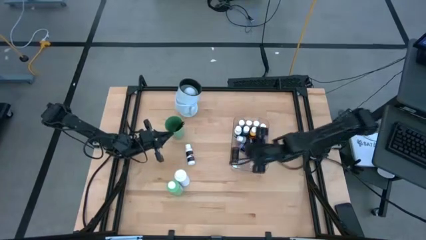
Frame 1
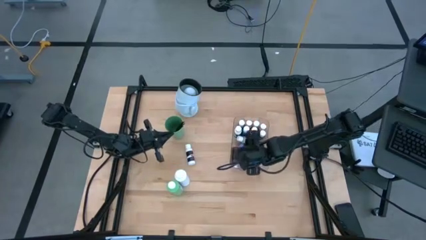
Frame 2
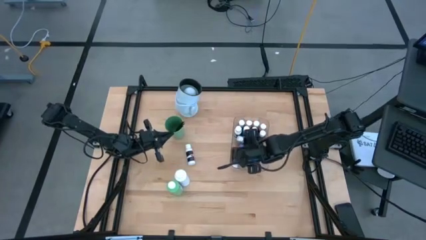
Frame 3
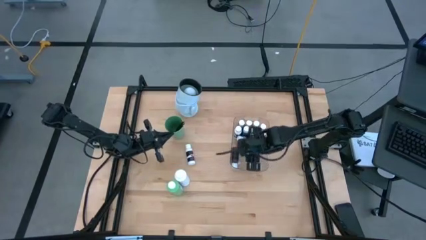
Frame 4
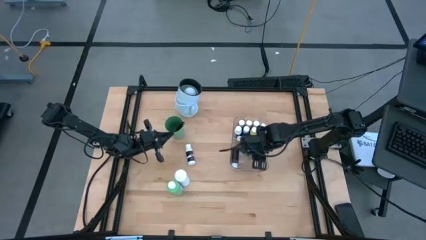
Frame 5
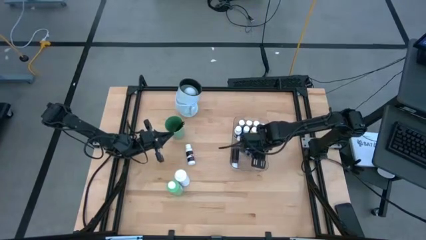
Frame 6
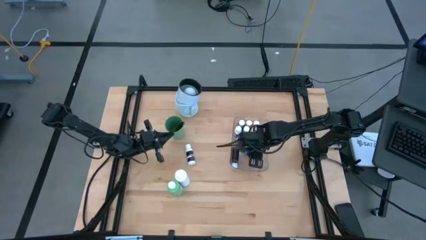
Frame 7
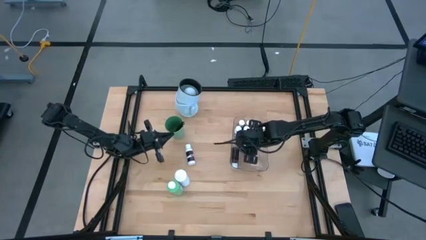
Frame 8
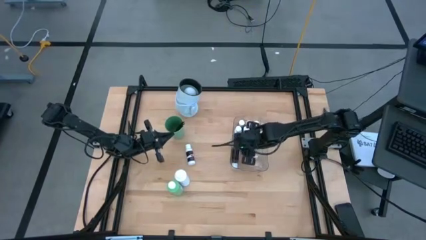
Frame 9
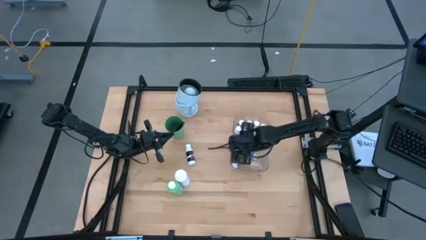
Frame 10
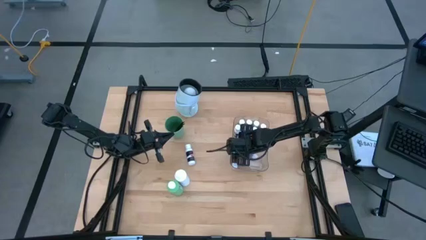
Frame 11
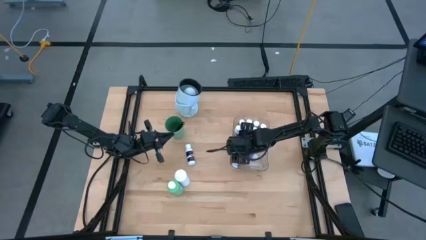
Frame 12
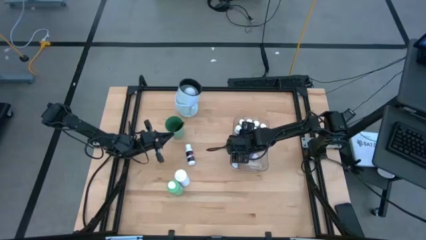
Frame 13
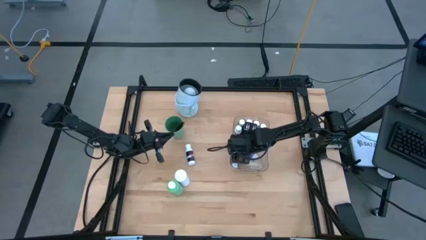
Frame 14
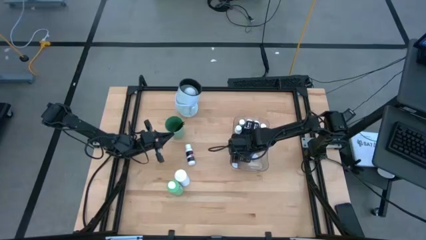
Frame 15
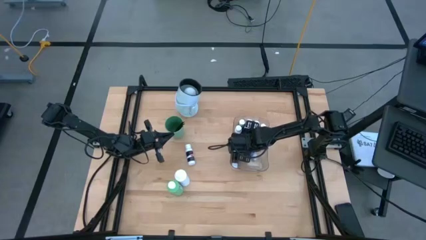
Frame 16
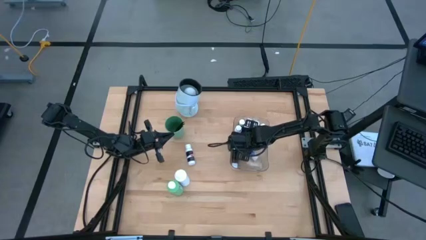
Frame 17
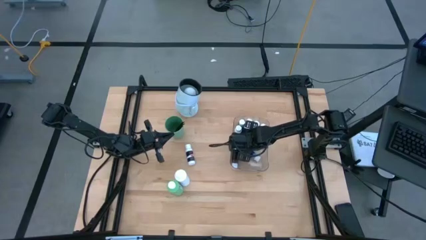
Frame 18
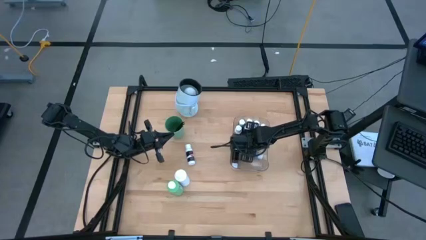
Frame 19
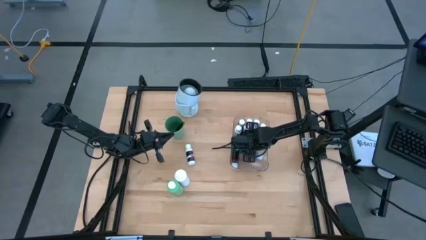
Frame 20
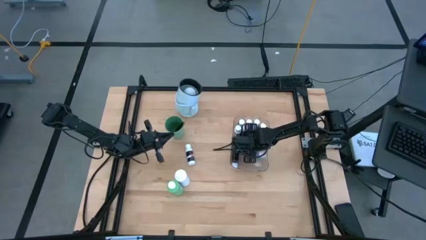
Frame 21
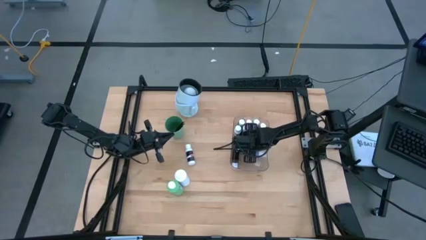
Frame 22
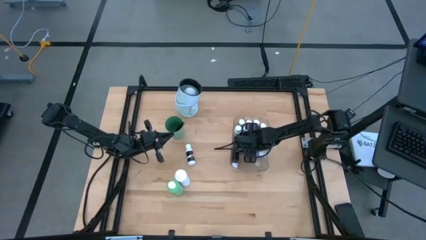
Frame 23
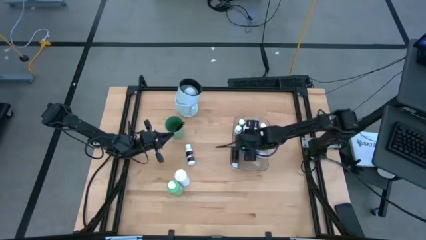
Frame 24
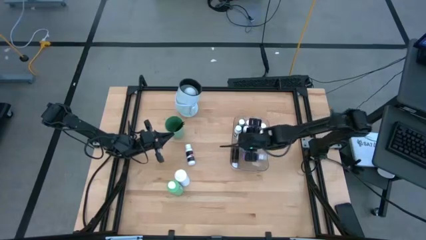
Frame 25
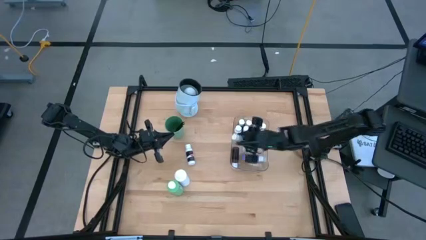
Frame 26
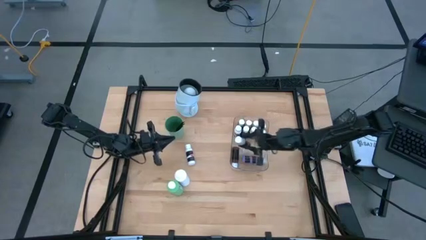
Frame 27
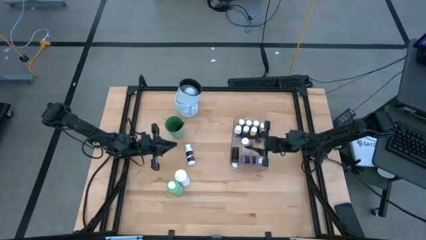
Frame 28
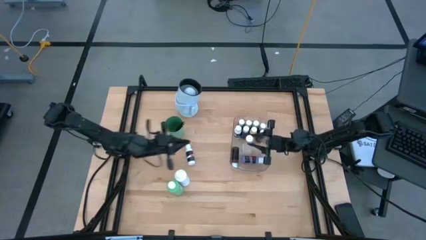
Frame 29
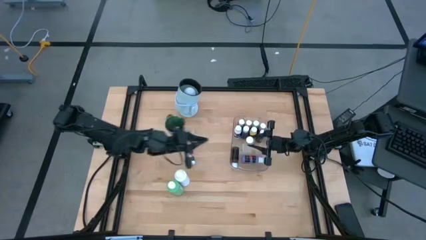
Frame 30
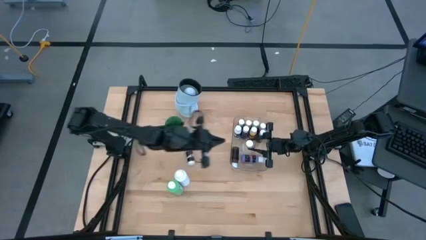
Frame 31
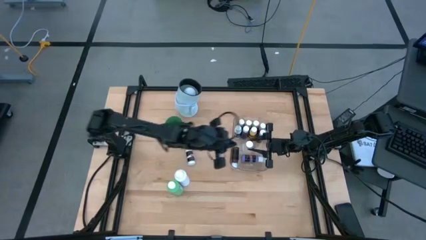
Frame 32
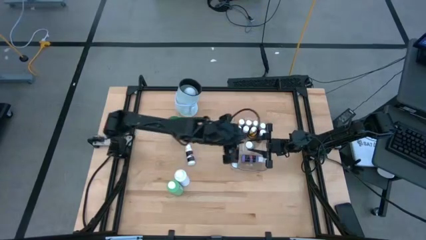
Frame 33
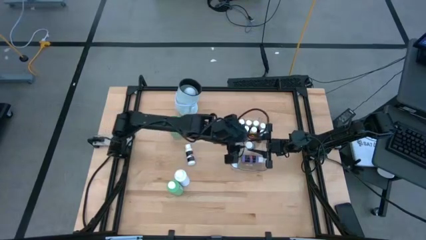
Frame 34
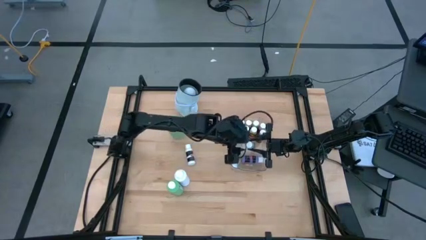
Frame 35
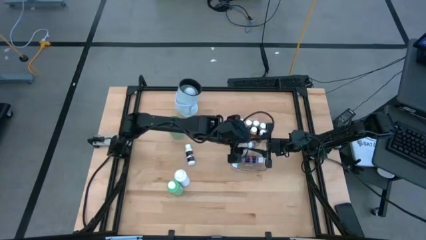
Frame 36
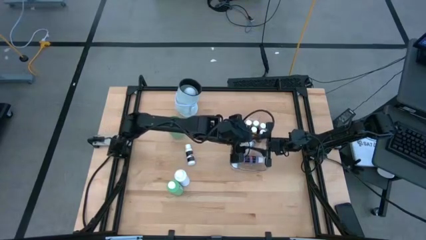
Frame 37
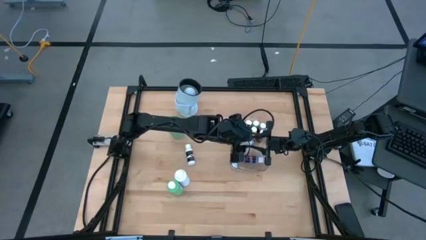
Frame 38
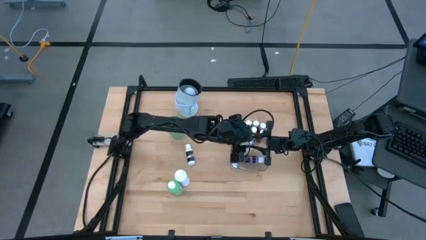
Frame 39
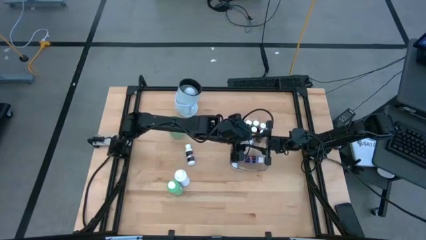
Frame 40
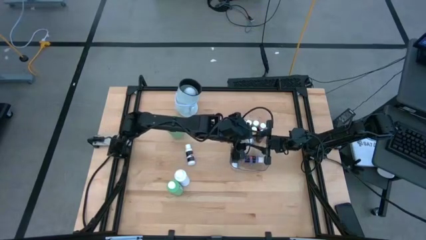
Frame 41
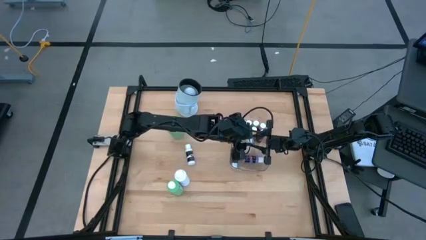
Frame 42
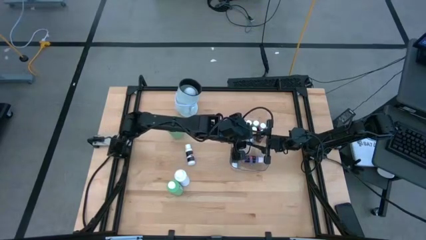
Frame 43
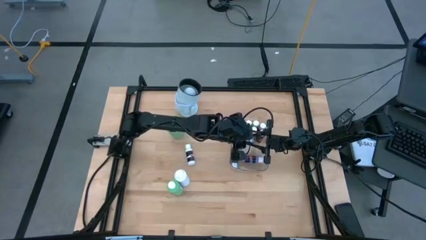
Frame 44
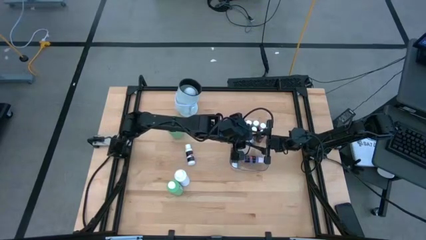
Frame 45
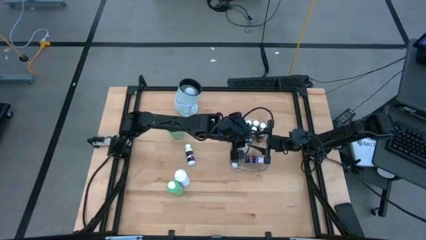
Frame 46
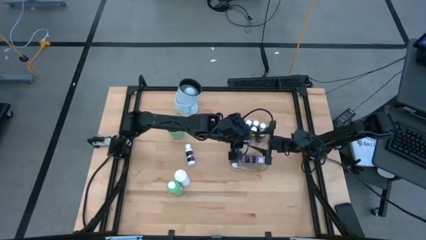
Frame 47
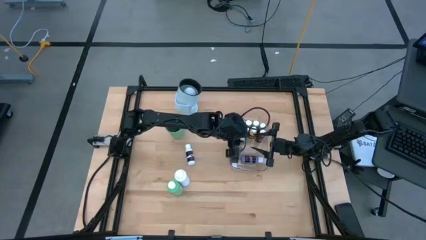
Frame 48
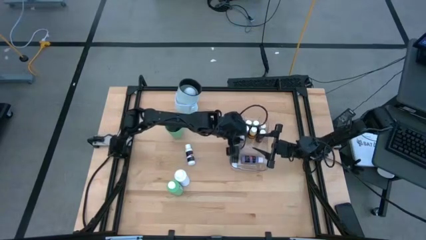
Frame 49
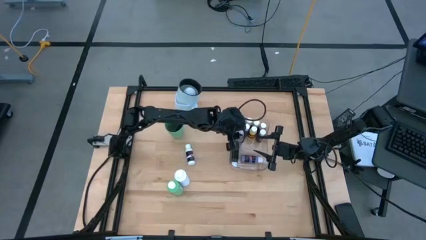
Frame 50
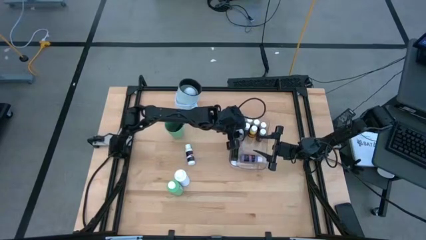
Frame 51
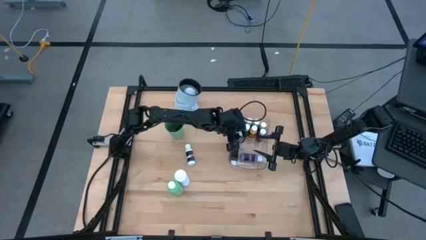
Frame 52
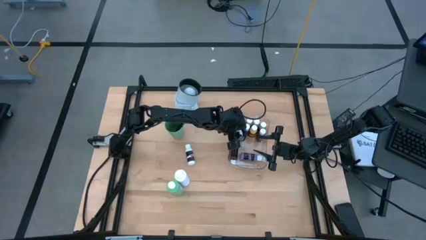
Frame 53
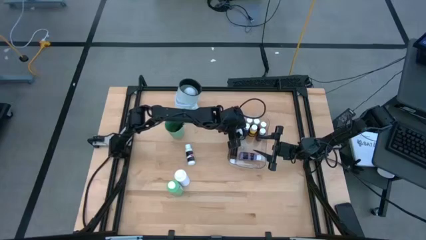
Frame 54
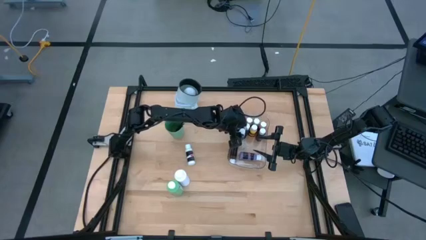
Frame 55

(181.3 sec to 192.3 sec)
Task: Pick & Place Paint Supplies
Put the gray paint bottle into the transparent bin
